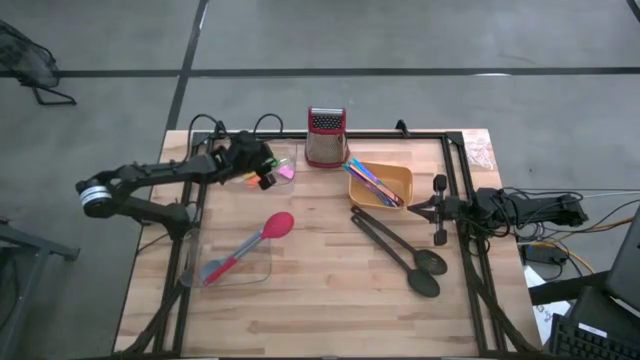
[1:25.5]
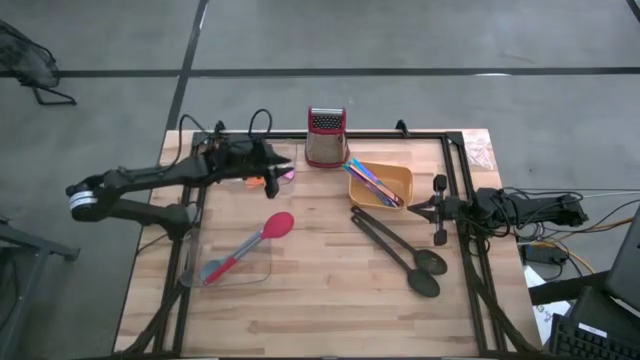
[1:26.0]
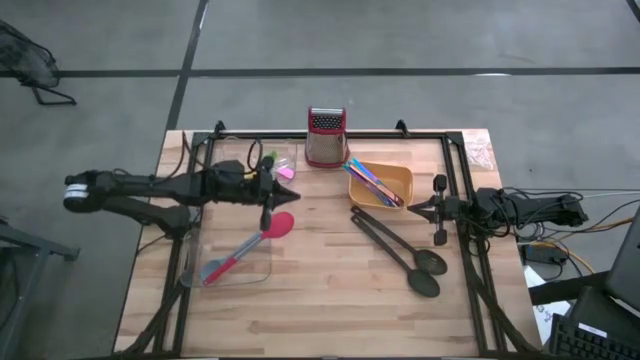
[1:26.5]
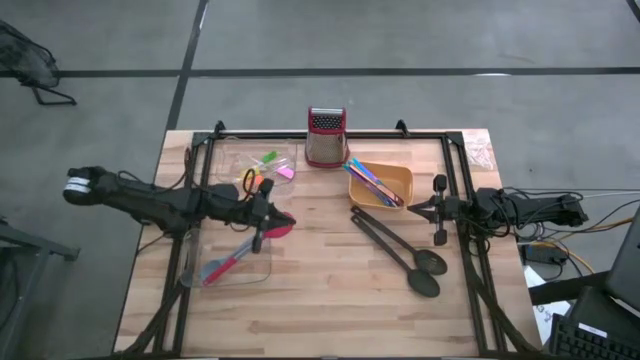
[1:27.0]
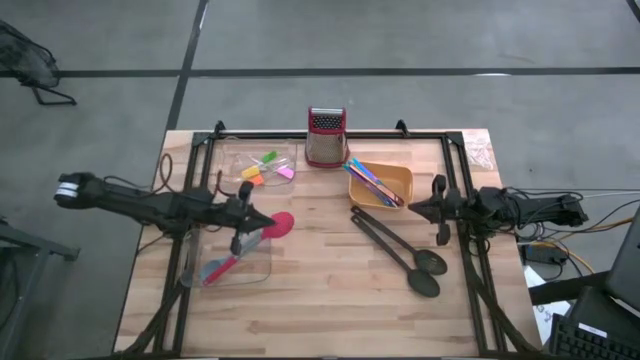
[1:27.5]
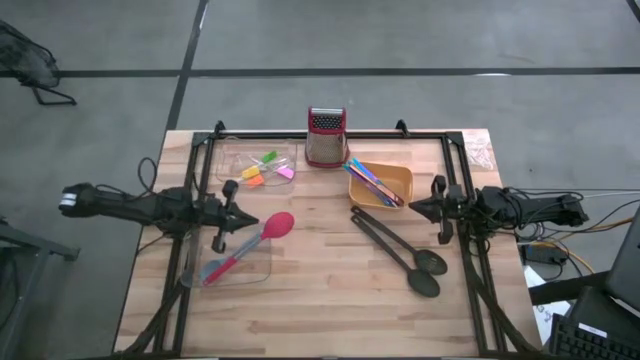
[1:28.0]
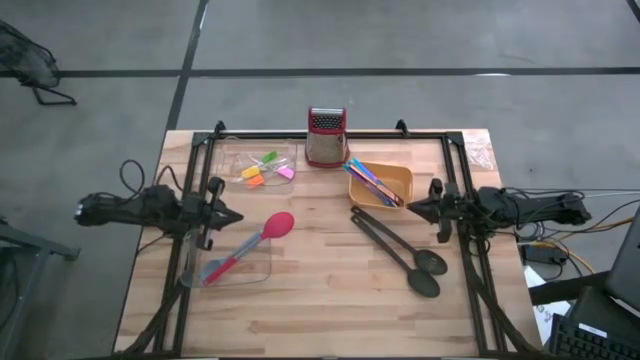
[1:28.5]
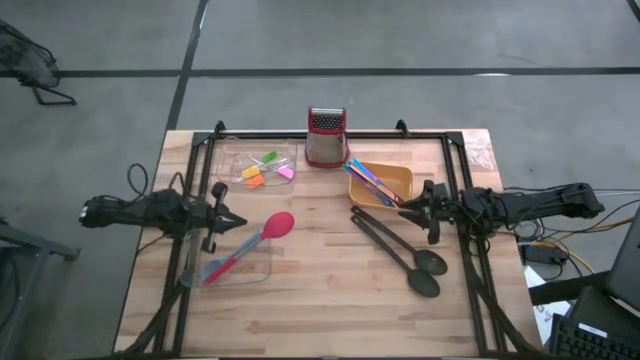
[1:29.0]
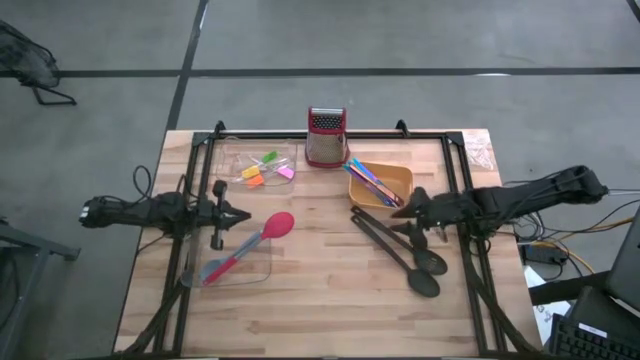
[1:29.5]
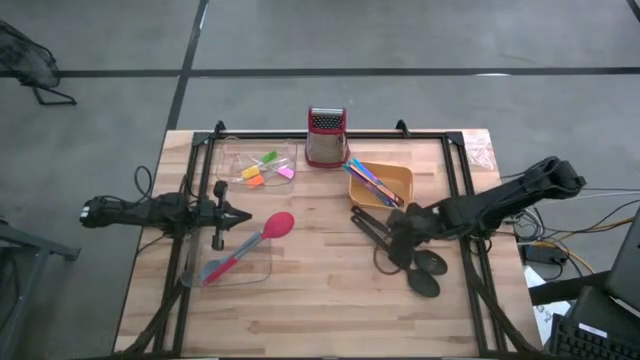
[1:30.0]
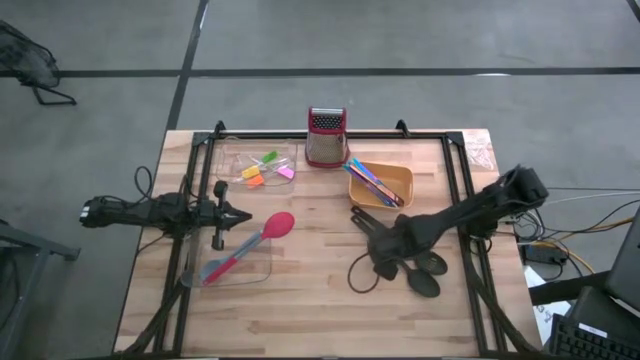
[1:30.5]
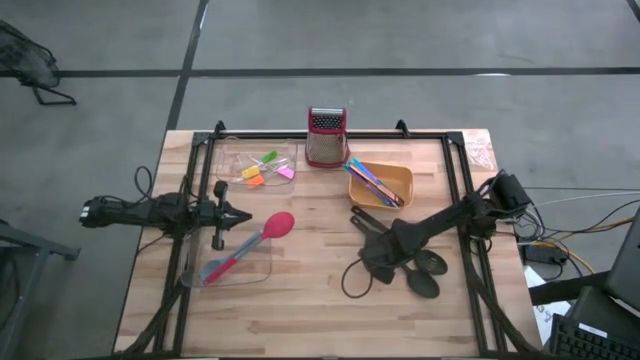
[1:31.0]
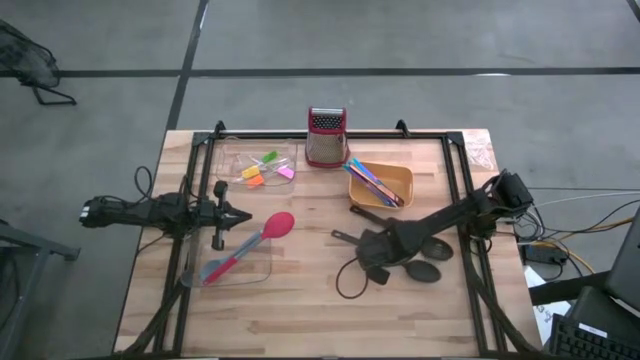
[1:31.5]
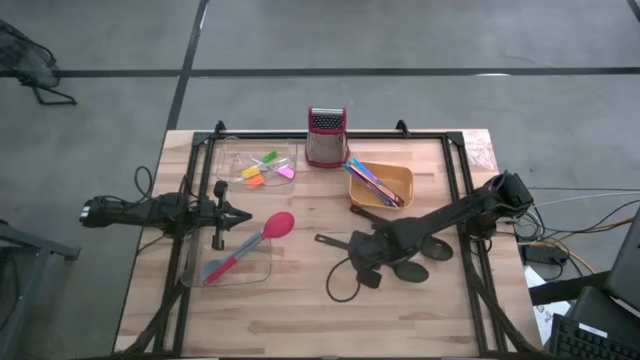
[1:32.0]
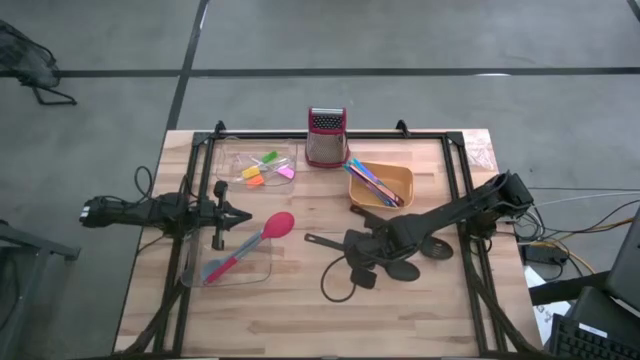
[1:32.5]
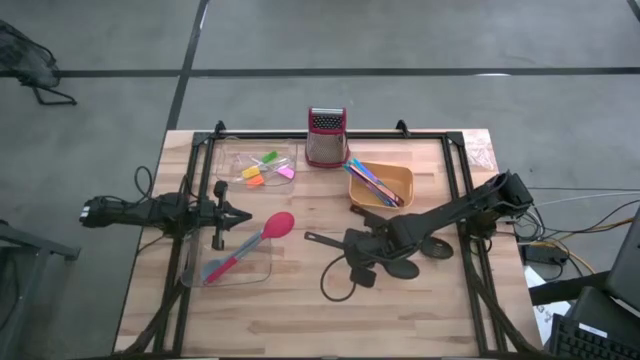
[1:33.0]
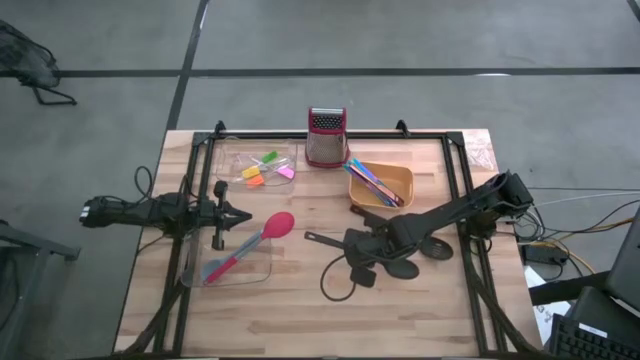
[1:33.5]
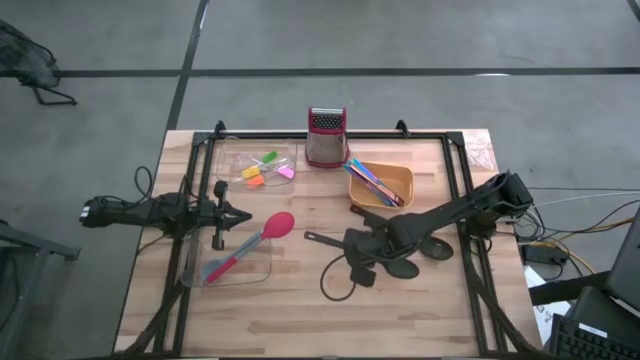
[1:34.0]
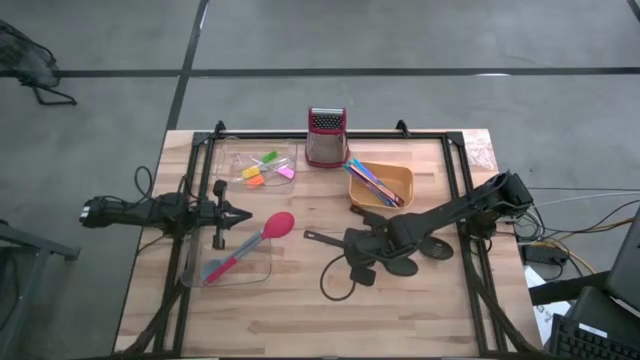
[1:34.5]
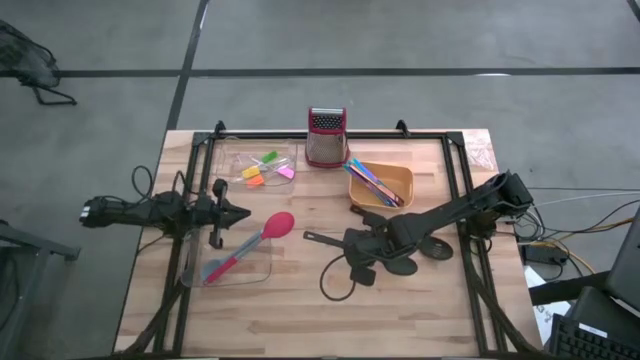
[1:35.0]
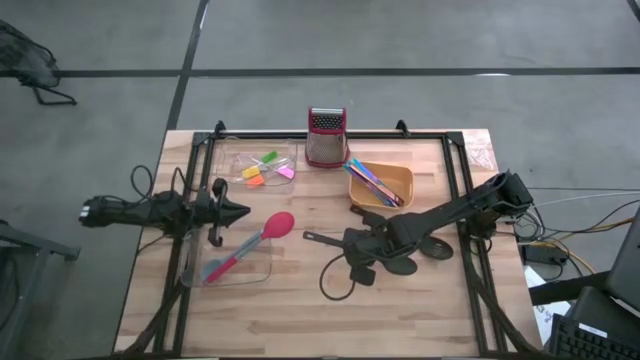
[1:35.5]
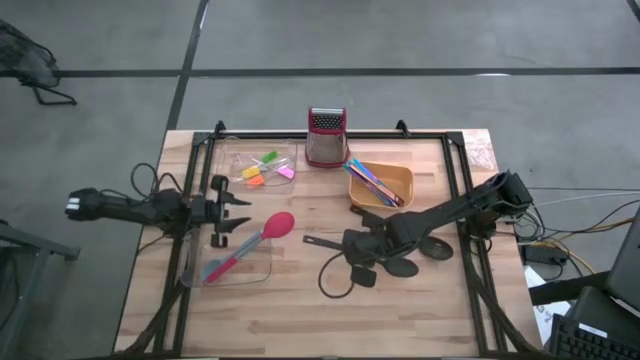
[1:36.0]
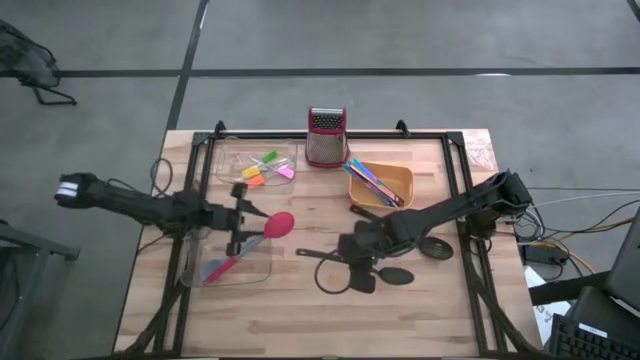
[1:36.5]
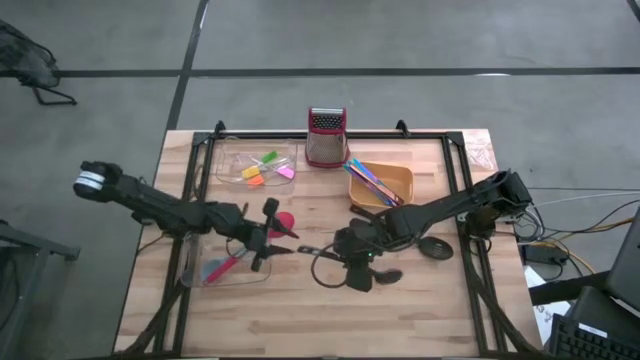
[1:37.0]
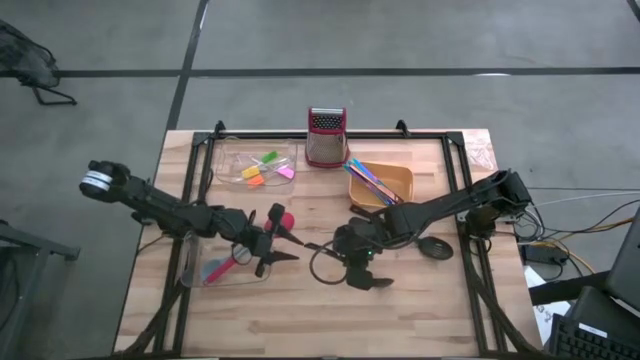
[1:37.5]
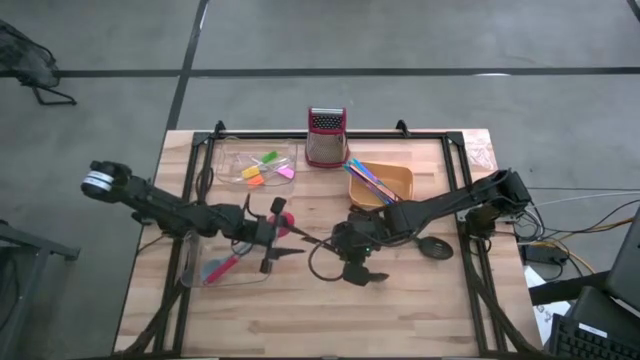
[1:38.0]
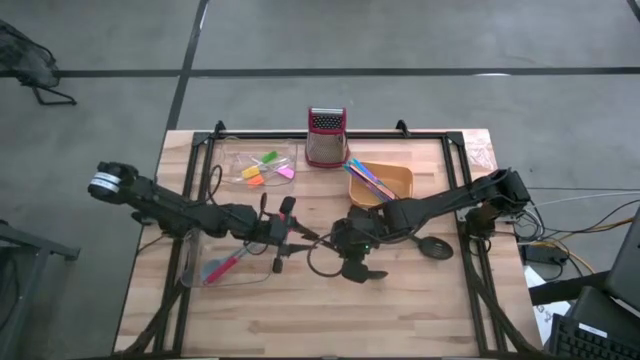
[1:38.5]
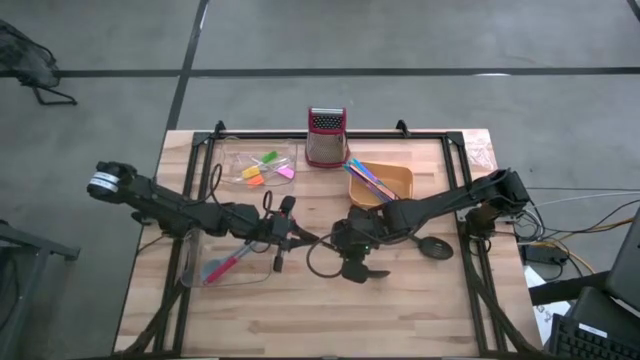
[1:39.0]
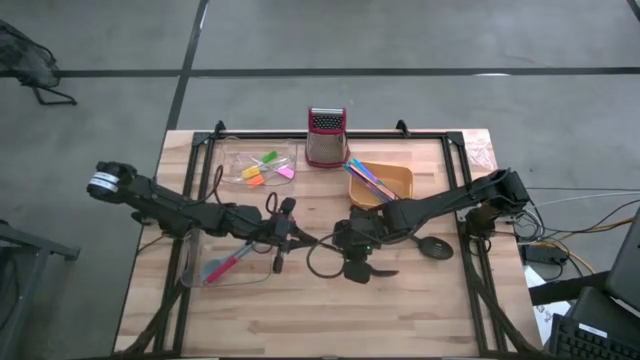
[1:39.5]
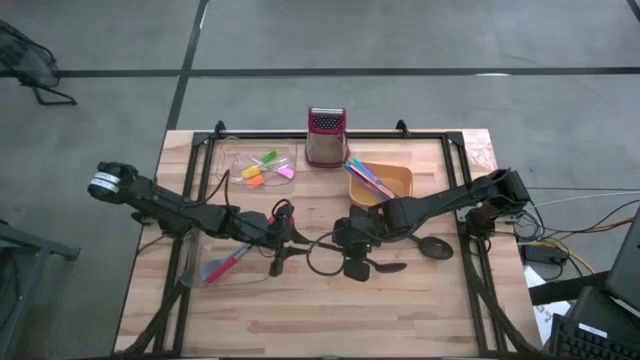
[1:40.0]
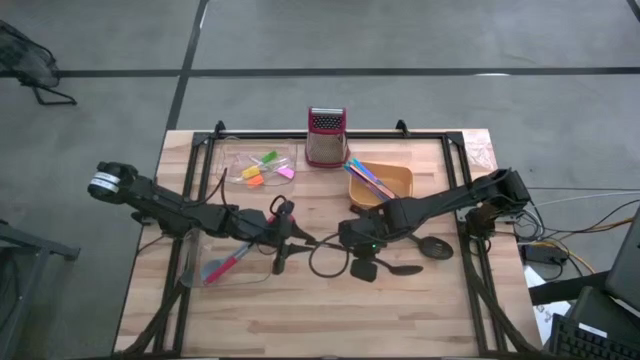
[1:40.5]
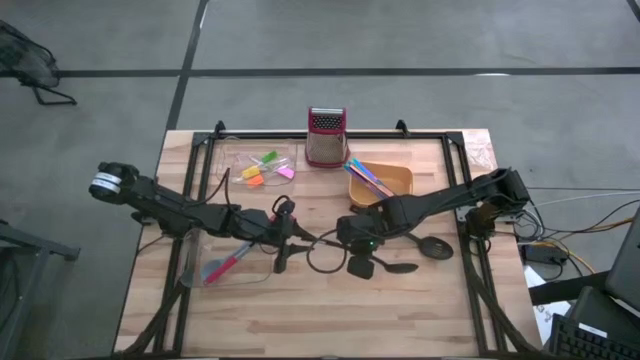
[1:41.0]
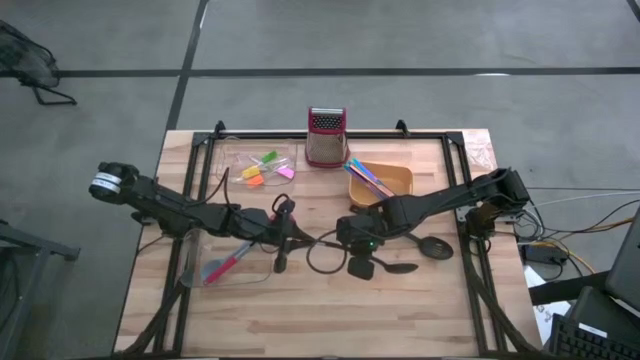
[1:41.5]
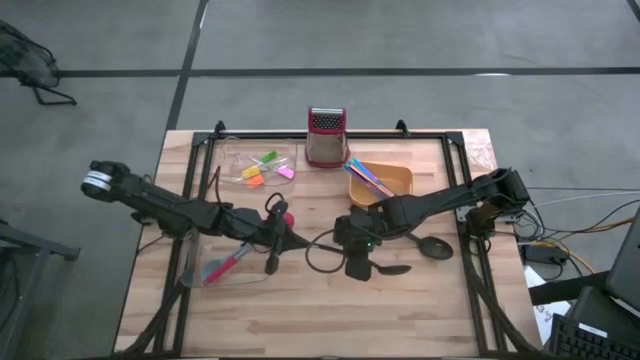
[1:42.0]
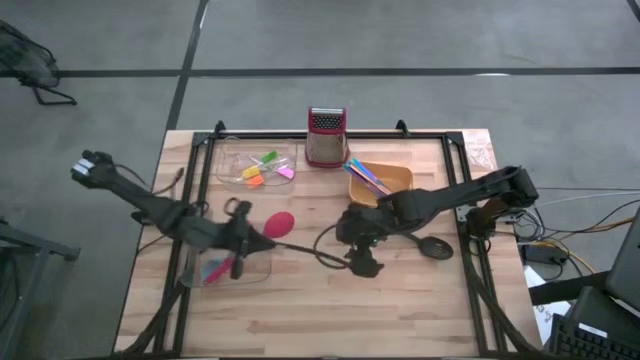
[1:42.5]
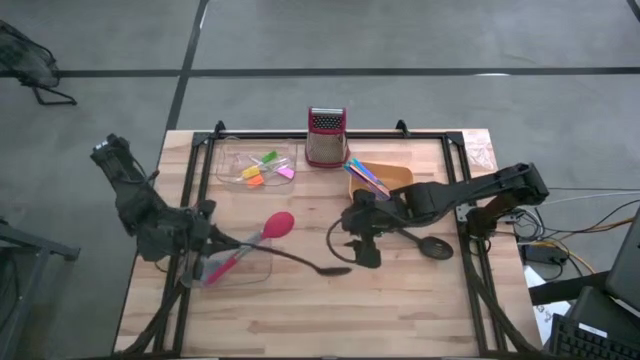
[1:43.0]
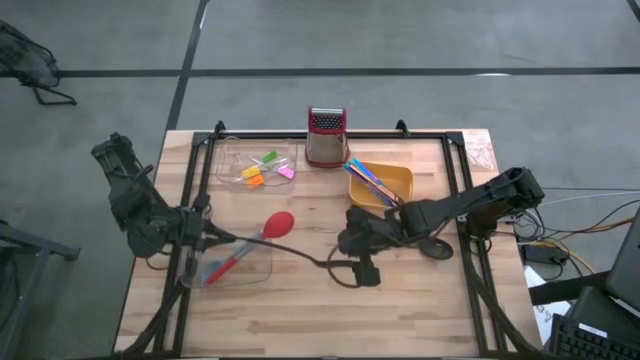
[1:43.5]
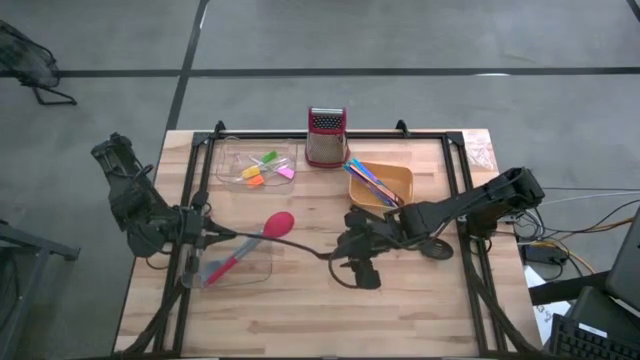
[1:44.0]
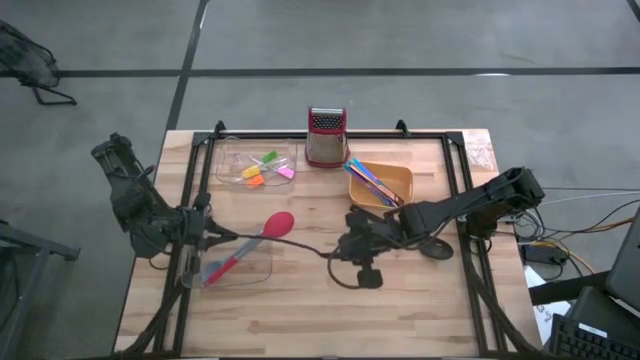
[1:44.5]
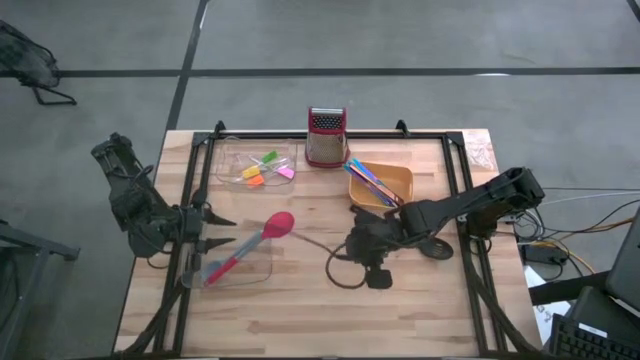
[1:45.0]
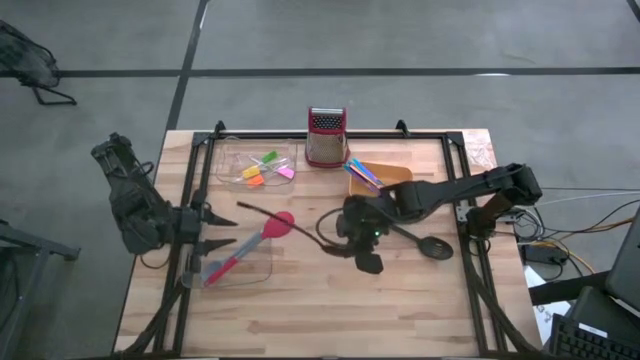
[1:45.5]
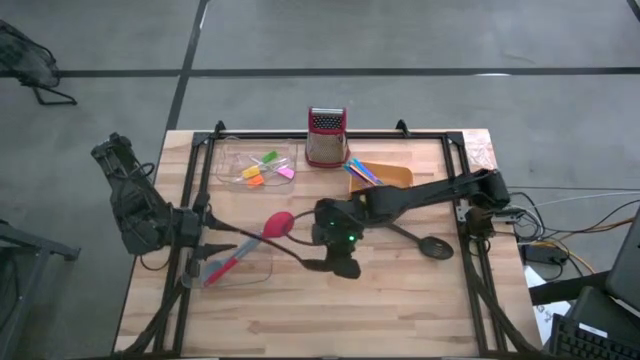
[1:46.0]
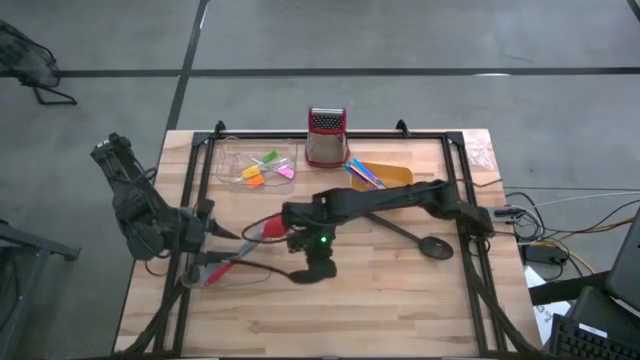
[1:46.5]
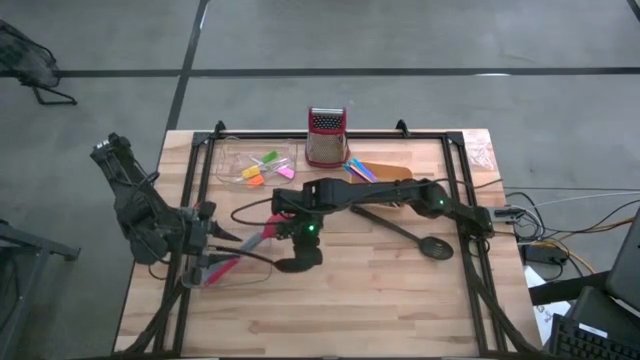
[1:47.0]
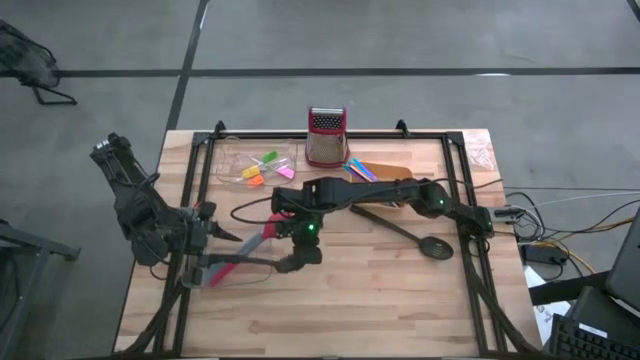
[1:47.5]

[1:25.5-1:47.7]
Task: Pick & Place Kitchen Items
Put the top black spoon into the bottom transparent bin
